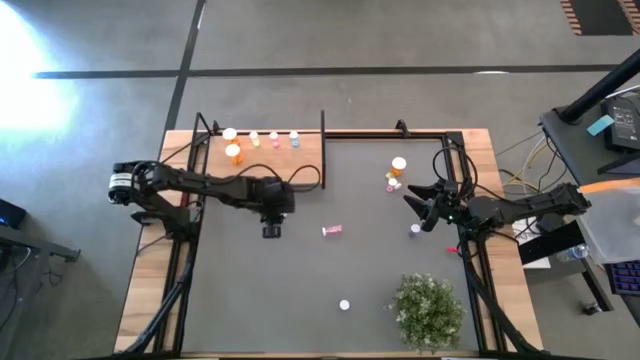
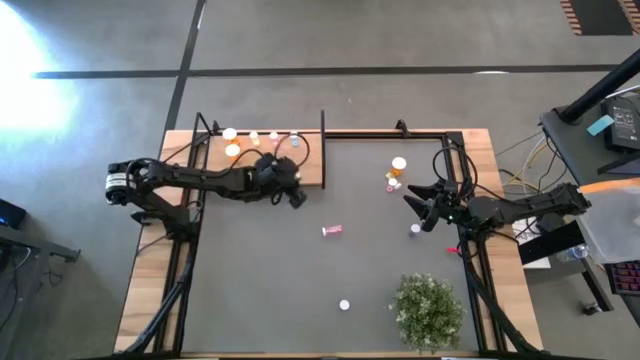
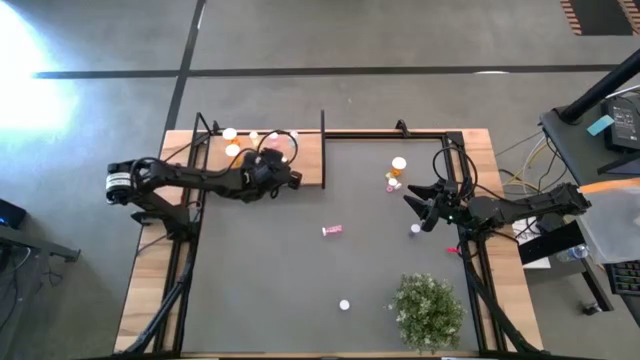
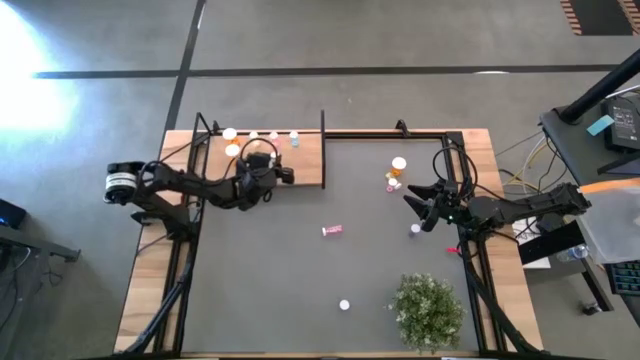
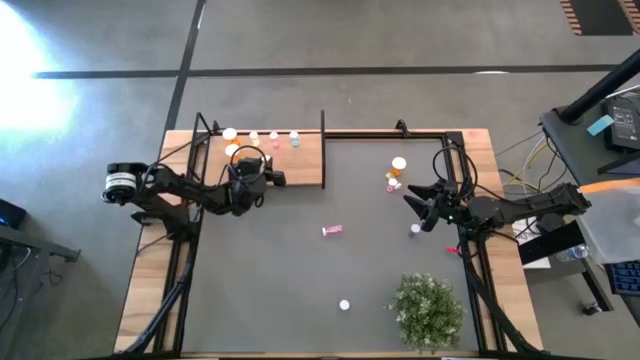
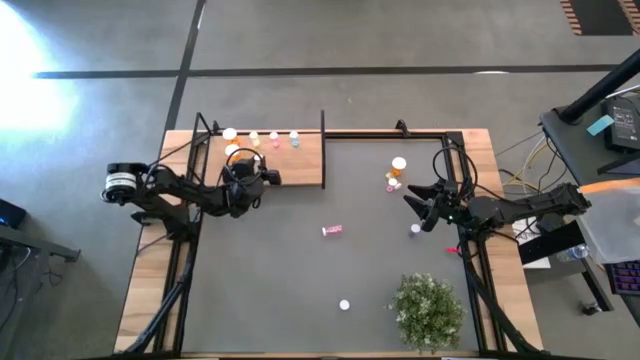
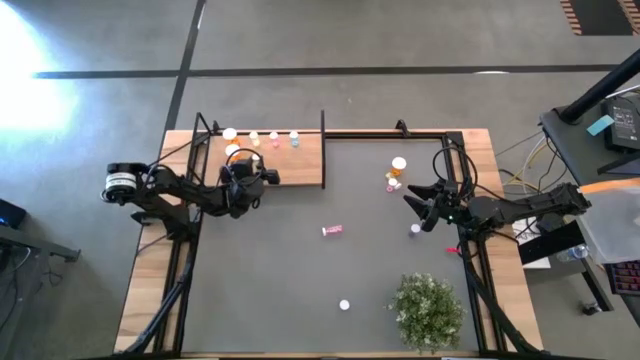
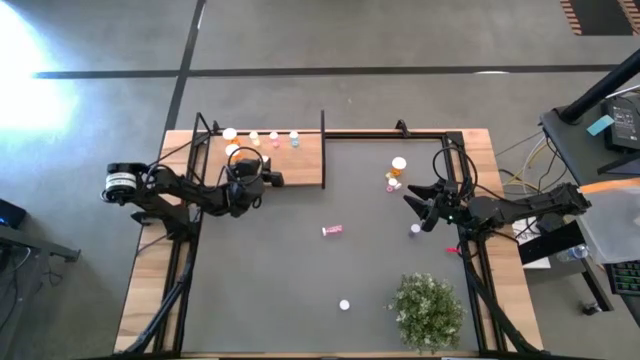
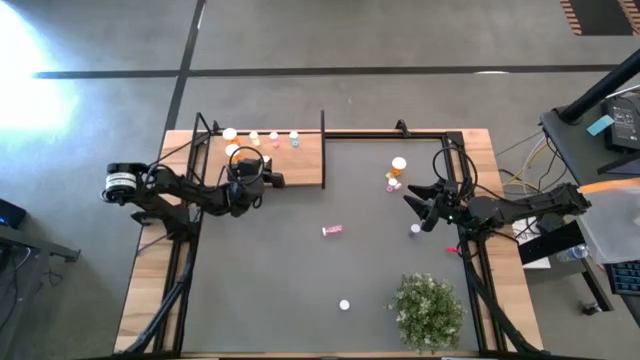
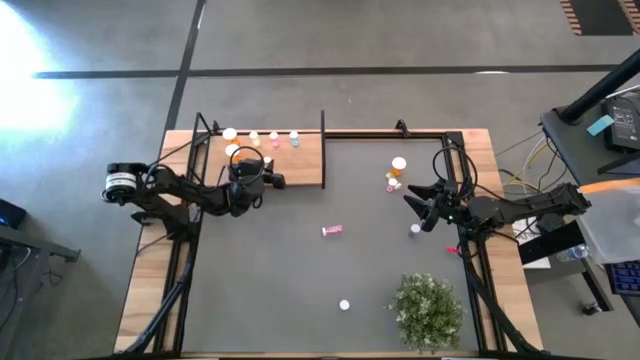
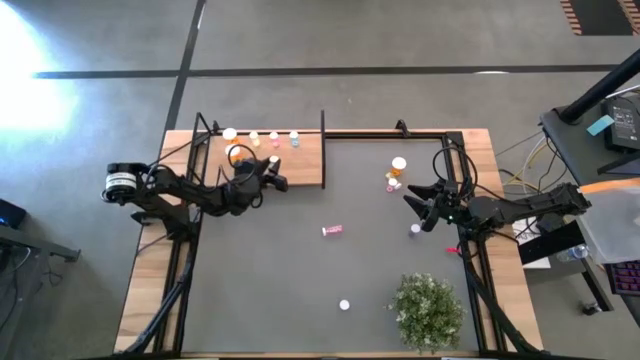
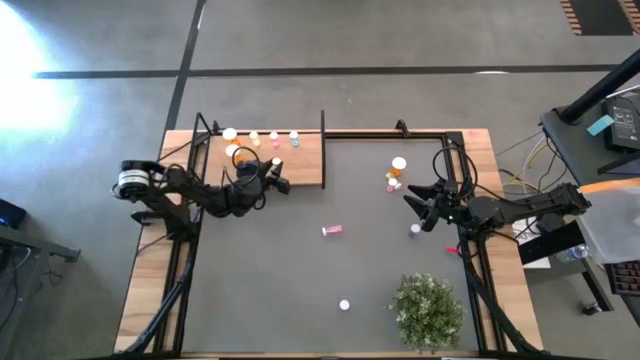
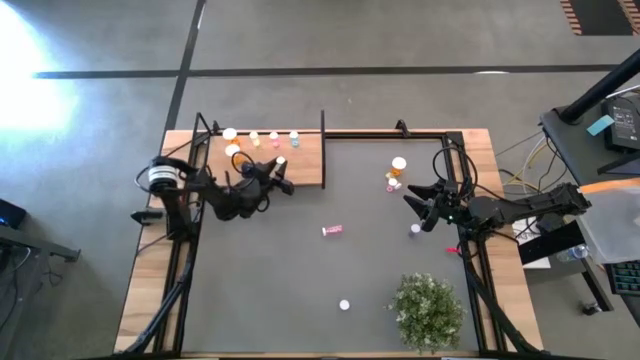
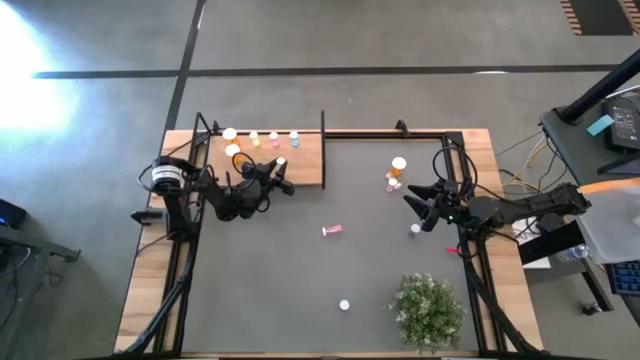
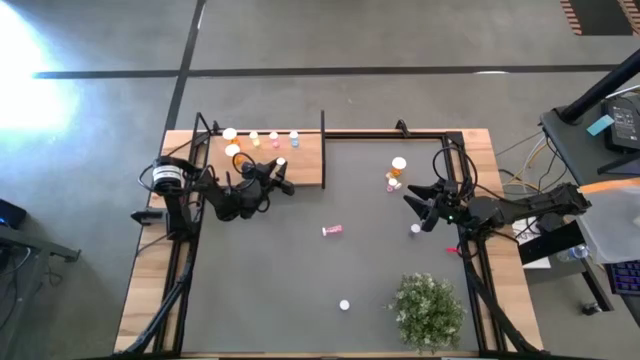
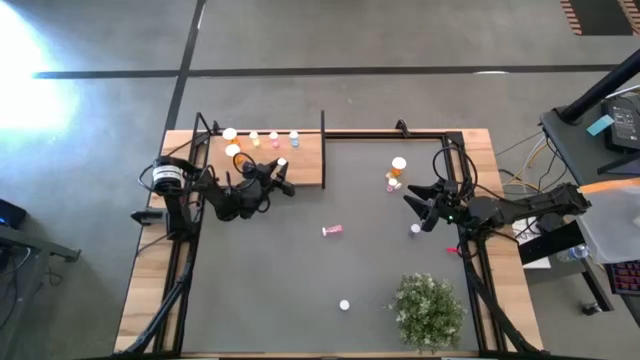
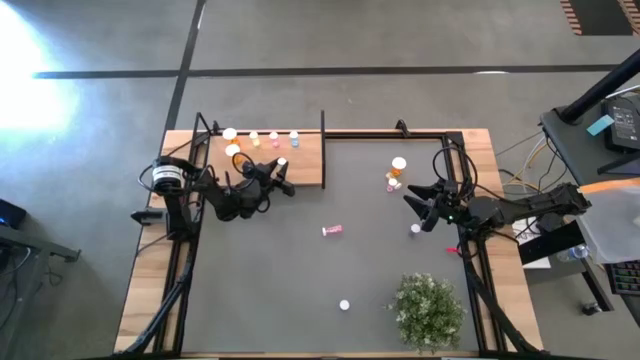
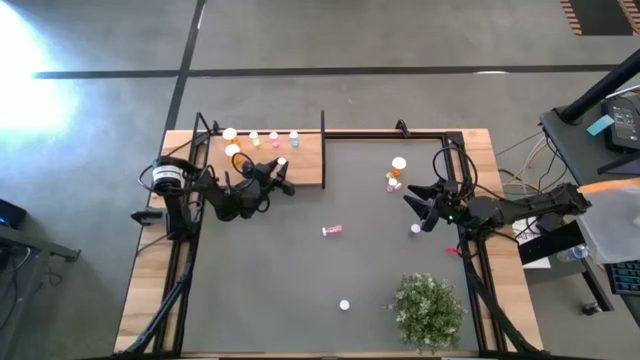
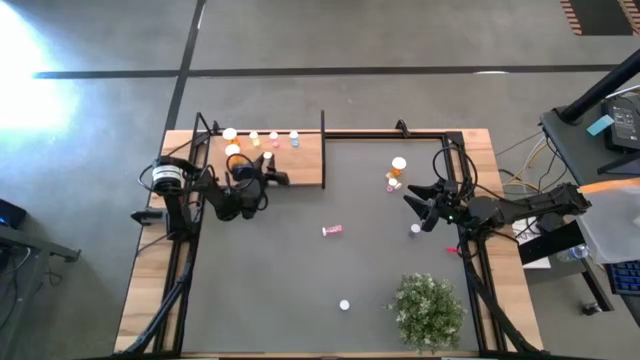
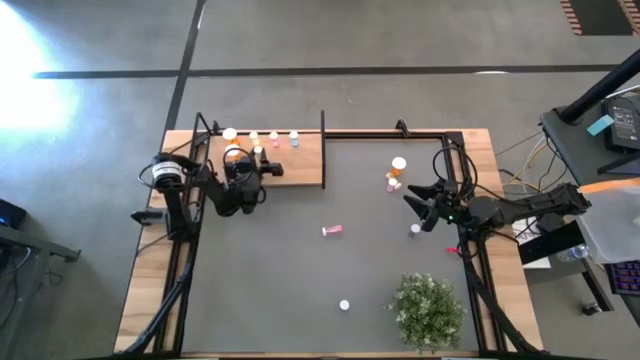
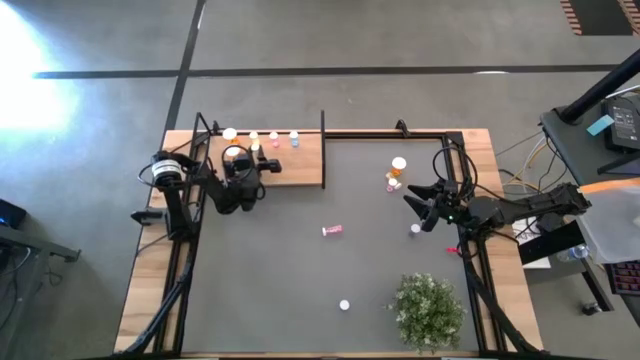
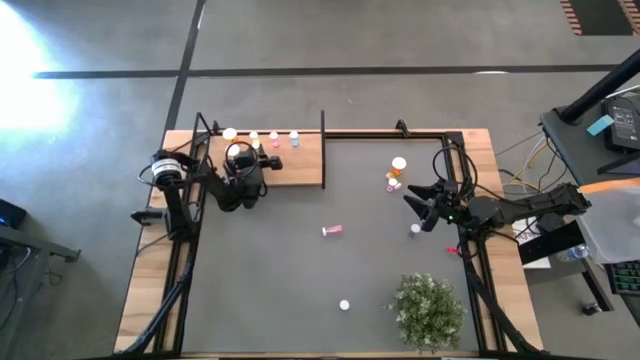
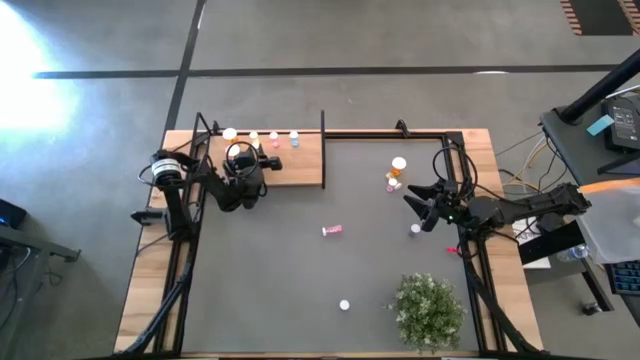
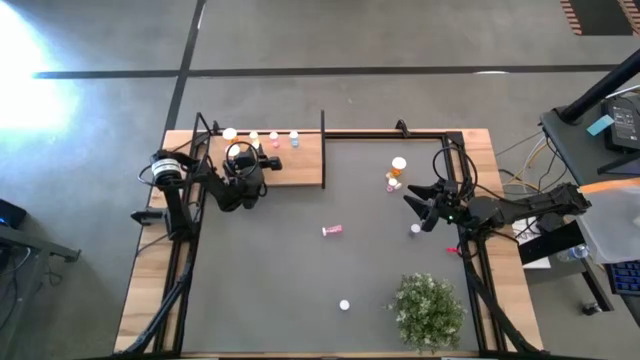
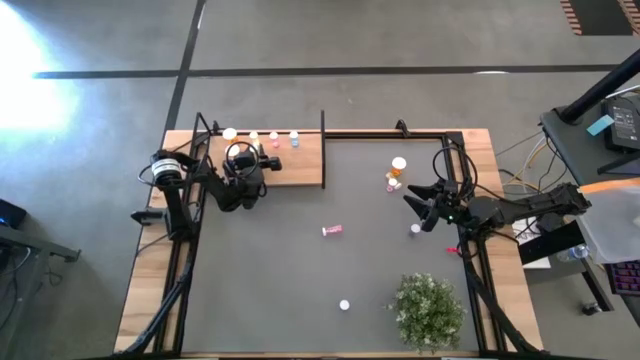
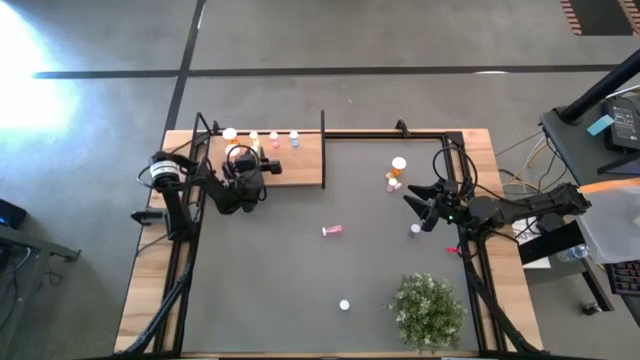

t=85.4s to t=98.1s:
Task: Pick and place medicine bottles onto shelf by color
Put the bottom yellow pill bottle on the shelf aligned with the other yellow pill bottle

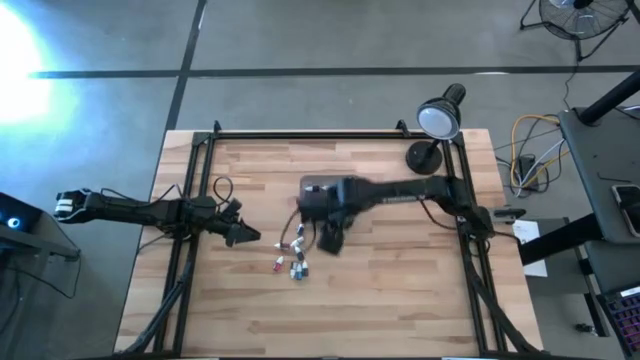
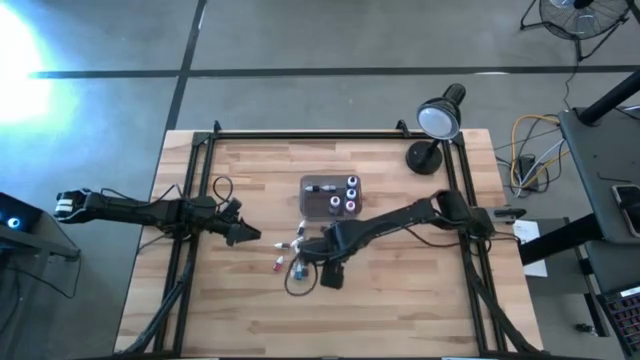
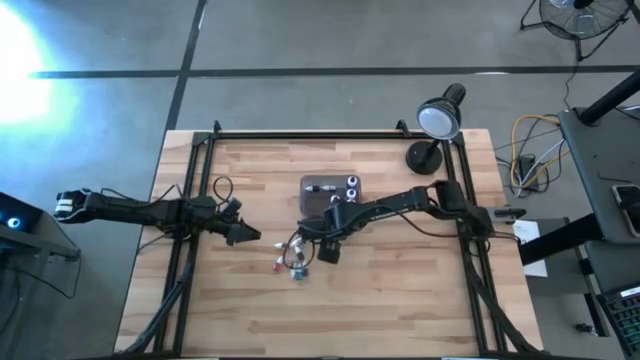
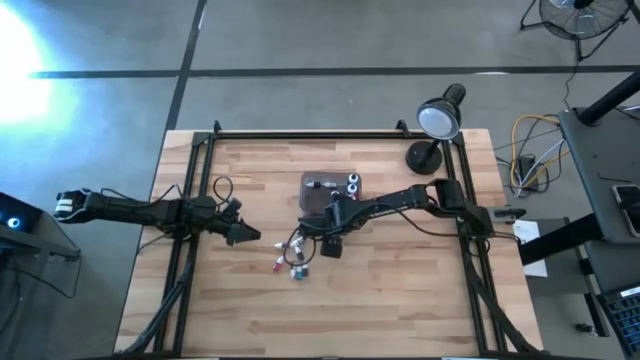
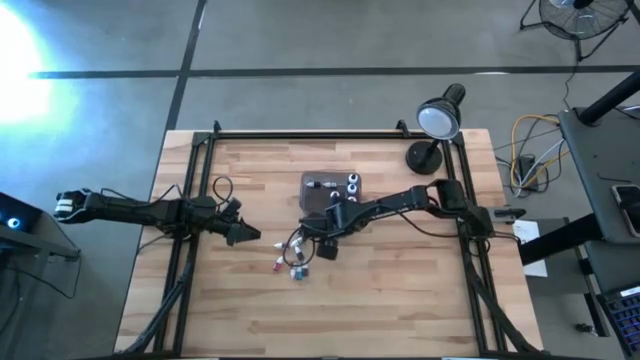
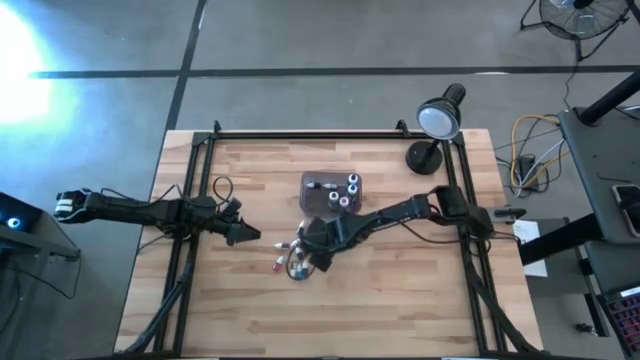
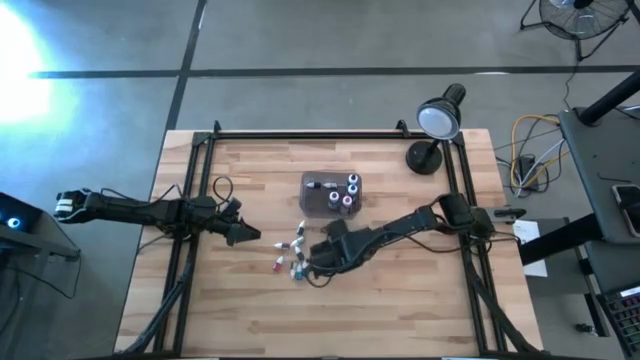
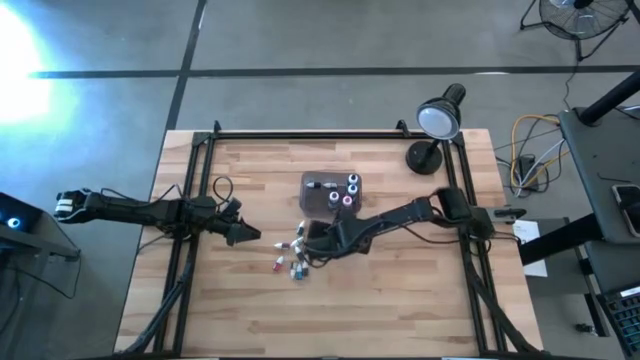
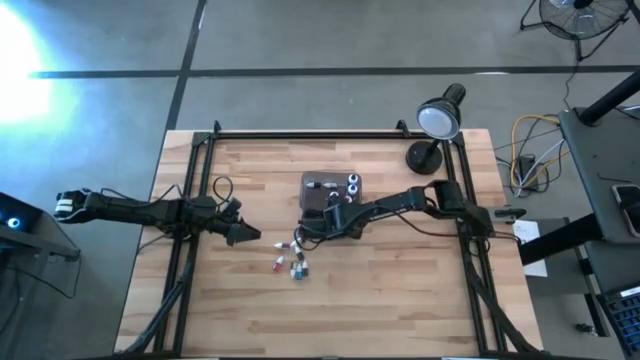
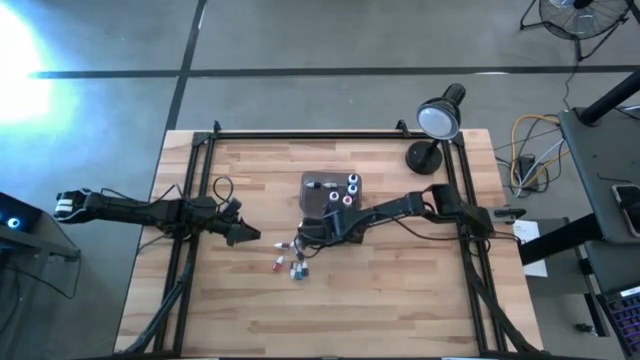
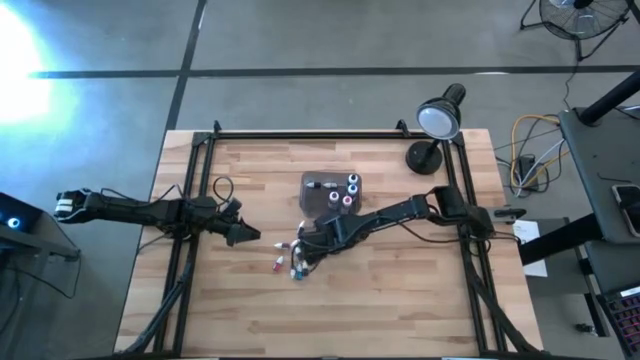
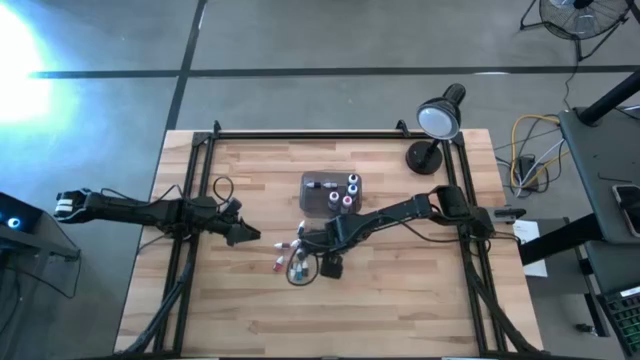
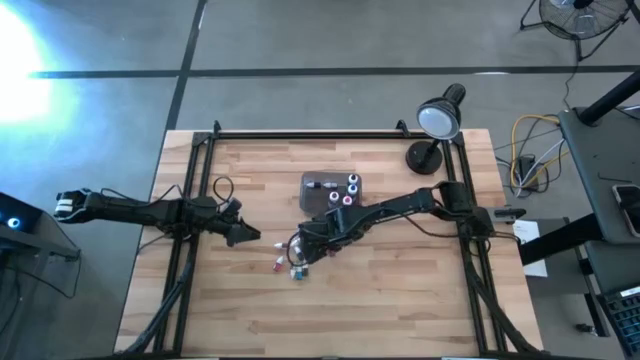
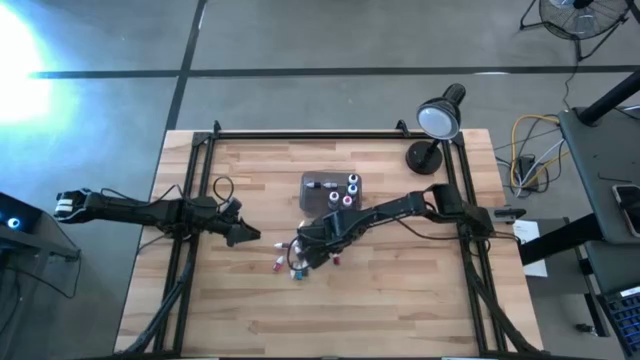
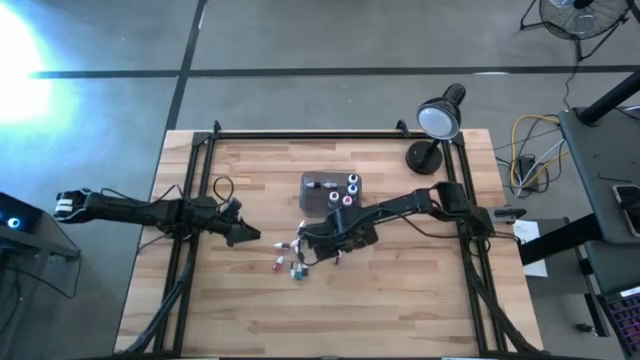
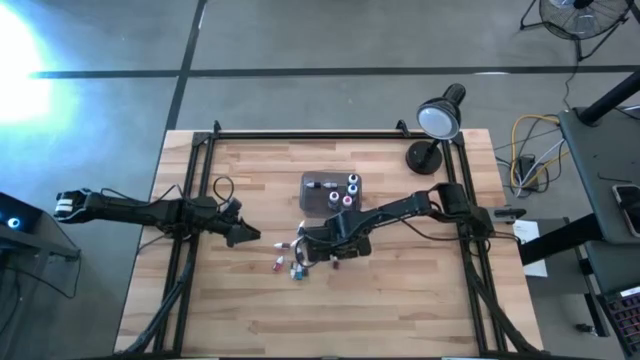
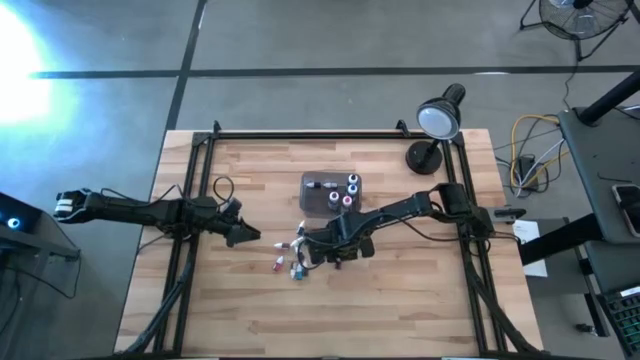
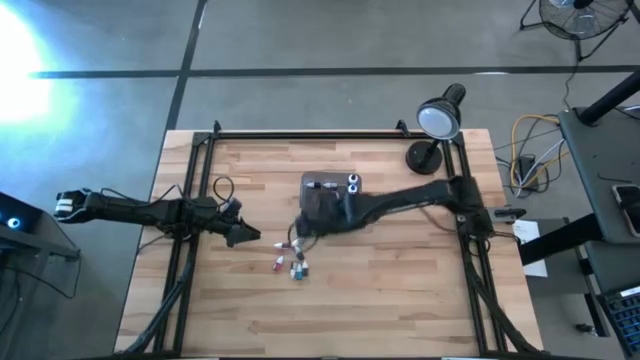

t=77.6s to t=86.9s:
Task: Pick & Place food coloring
Put the small red food coloring bottle into the bin
